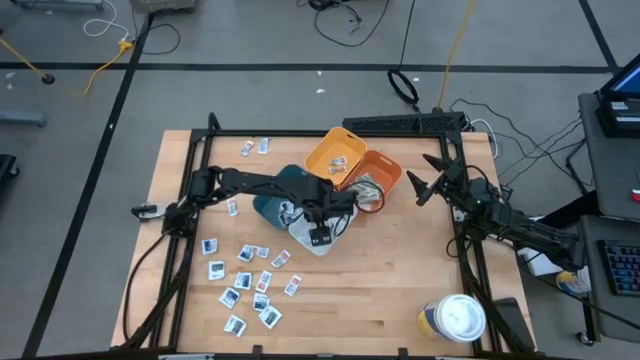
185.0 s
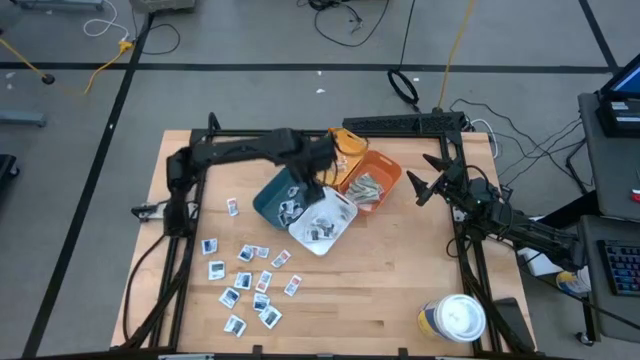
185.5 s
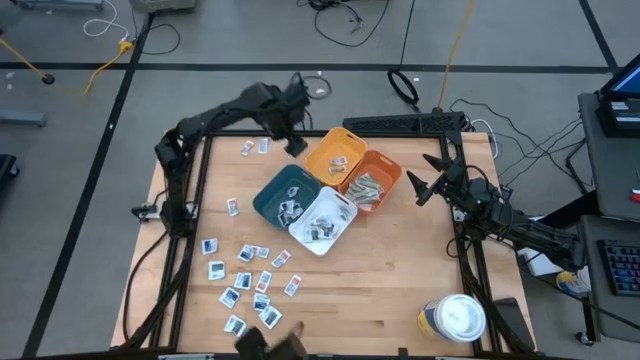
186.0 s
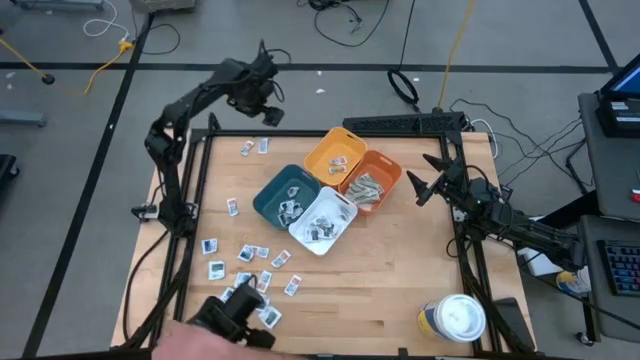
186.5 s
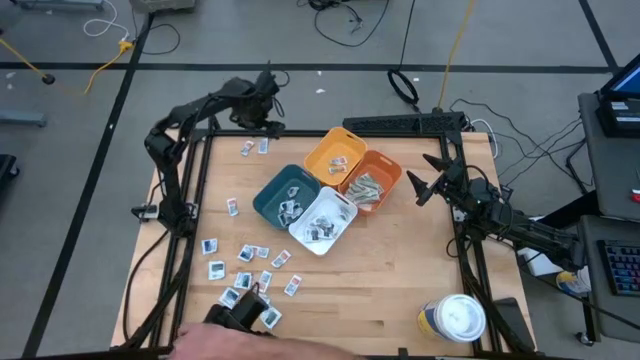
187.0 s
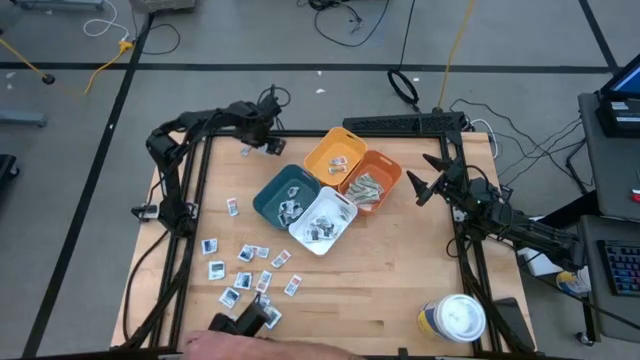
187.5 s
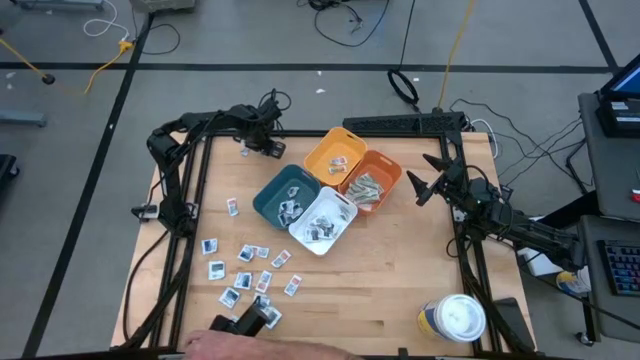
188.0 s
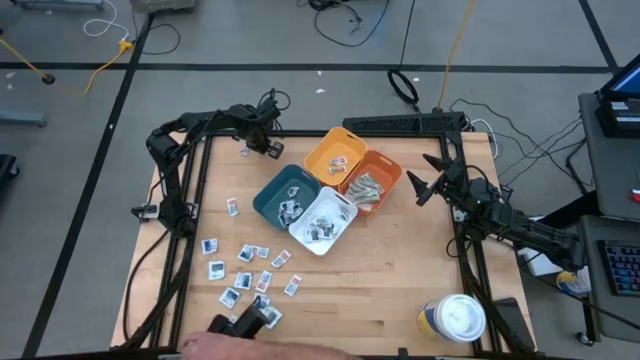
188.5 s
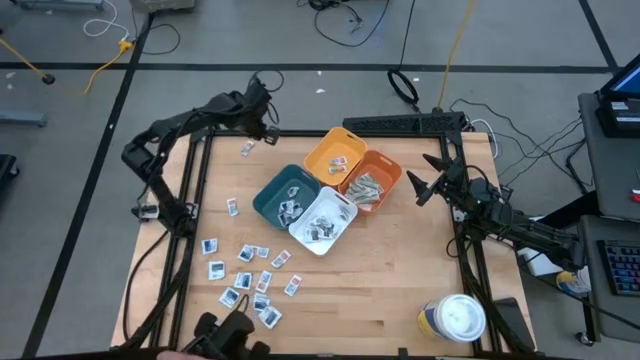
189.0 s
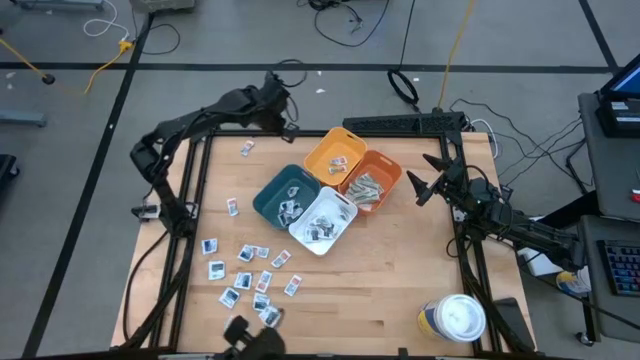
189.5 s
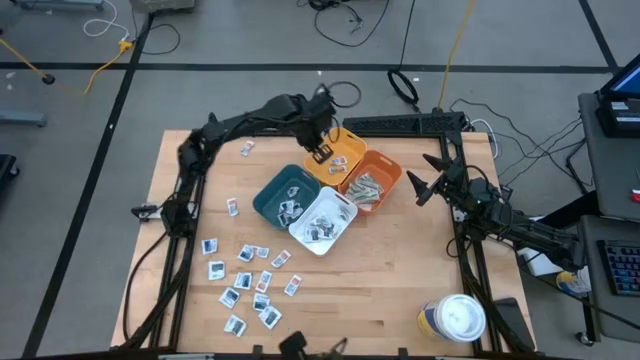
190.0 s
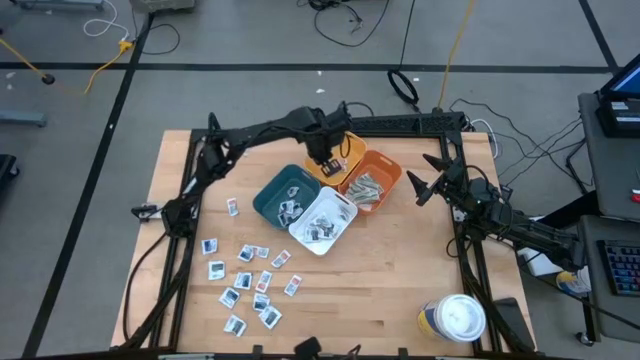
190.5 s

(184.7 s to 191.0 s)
Task: Pick & Place First Aid Supplies
Put the orange ointment pack into the yellow bin

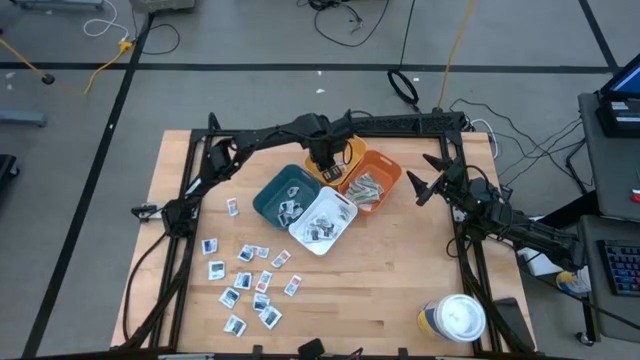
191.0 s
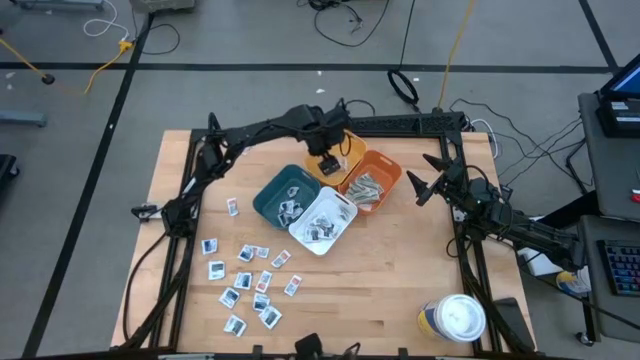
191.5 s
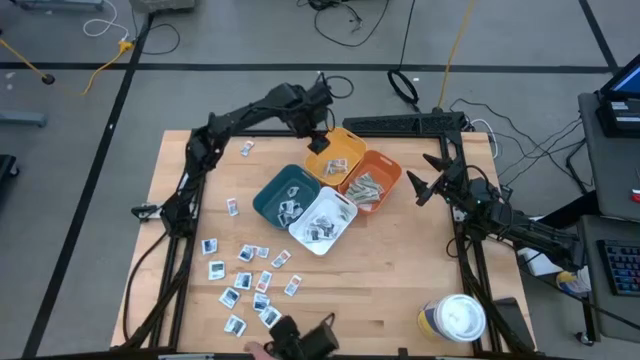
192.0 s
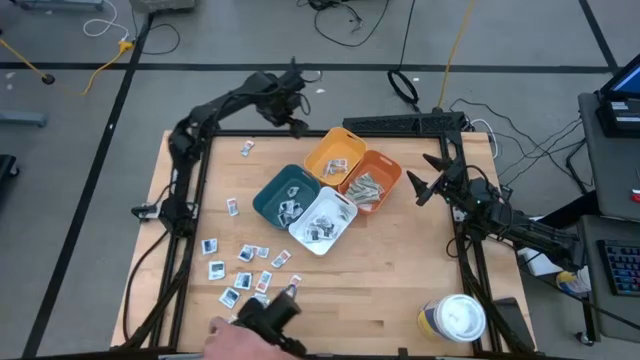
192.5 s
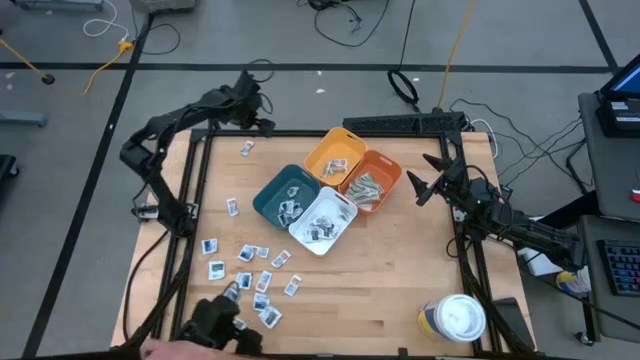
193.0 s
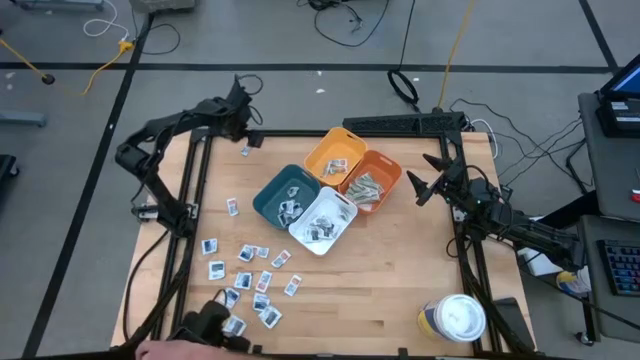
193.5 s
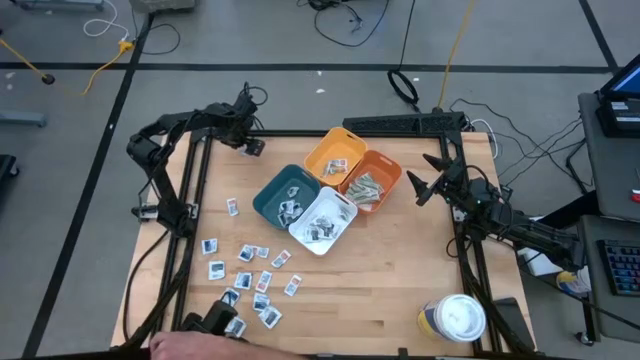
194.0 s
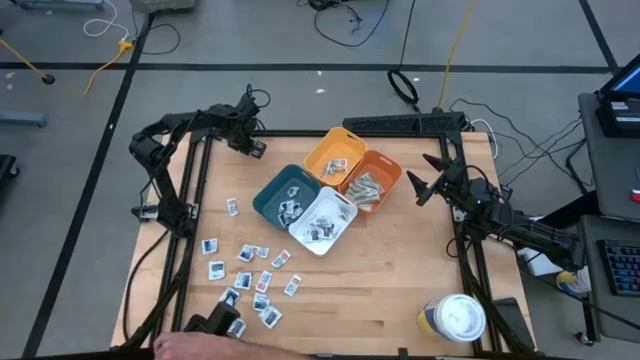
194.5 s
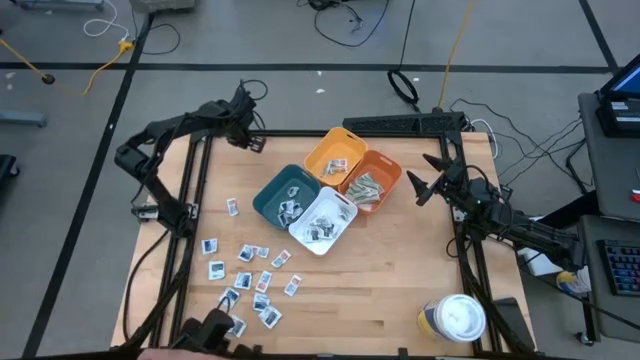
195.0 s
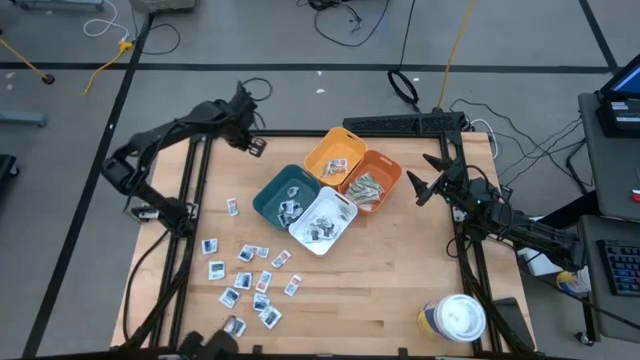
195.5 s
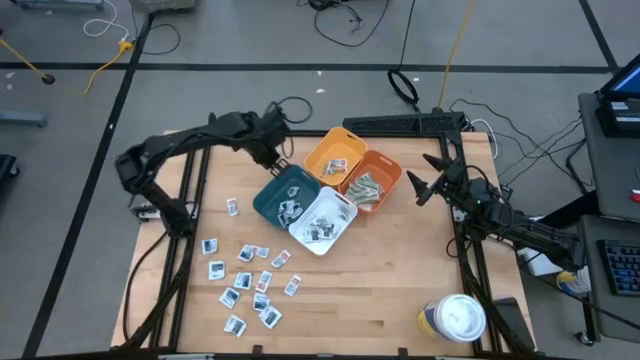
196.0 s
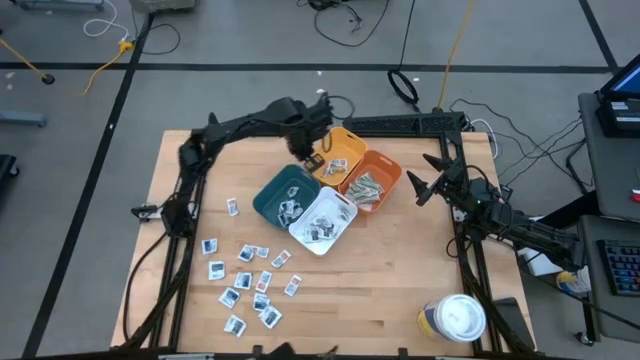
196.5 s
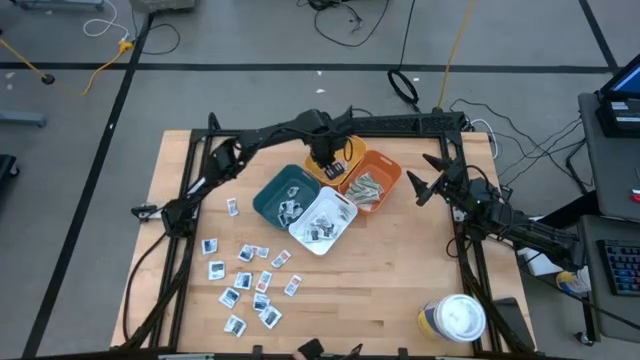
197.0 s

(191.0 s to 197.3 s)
Put the orange ointment pack into the yellow bin

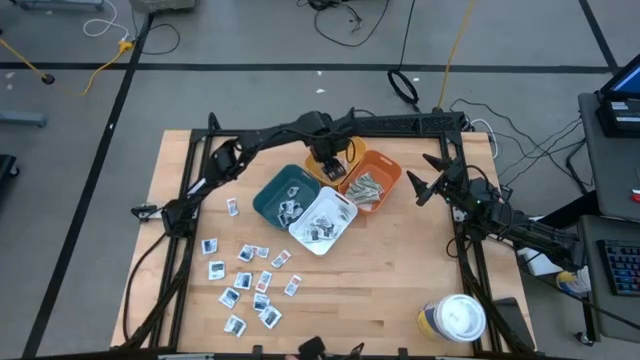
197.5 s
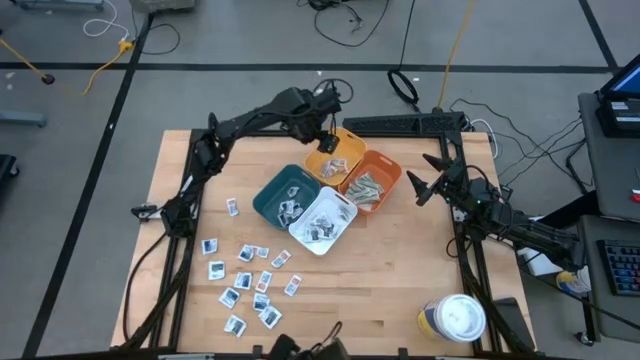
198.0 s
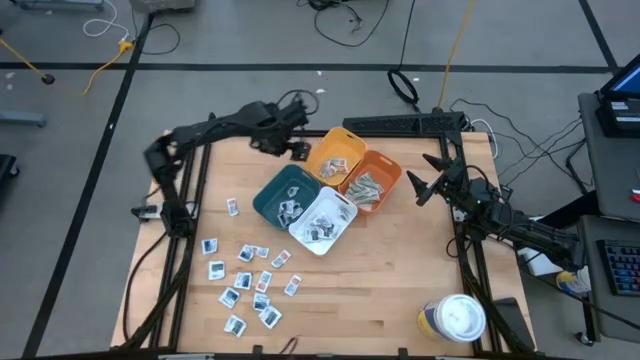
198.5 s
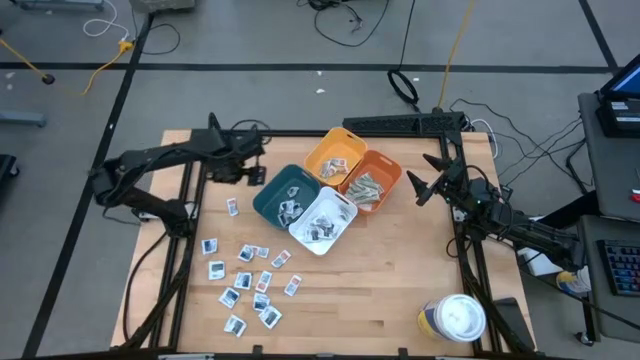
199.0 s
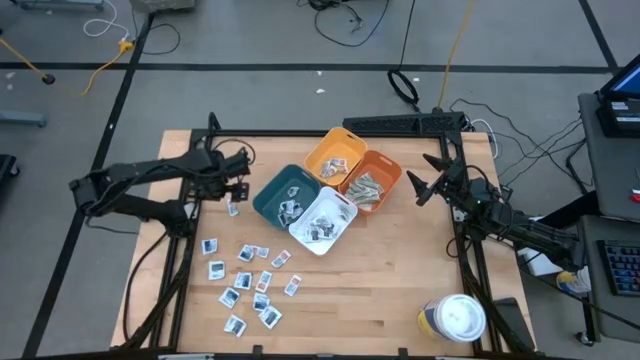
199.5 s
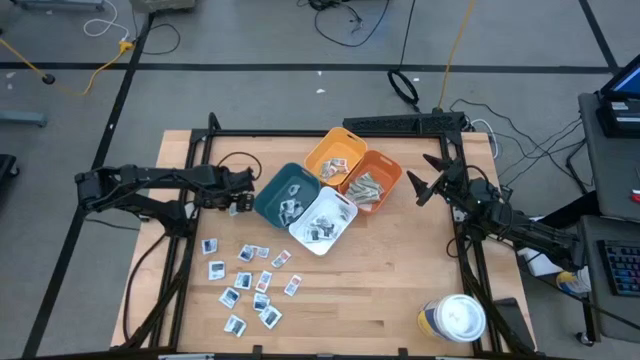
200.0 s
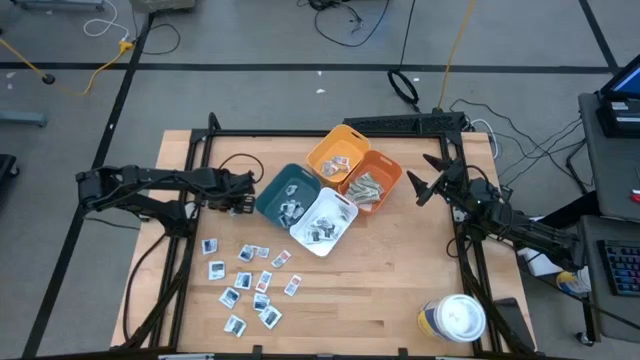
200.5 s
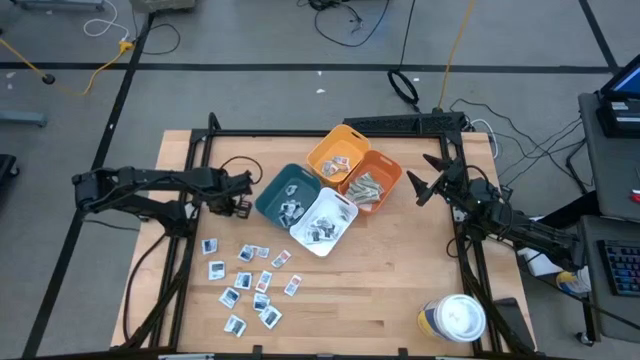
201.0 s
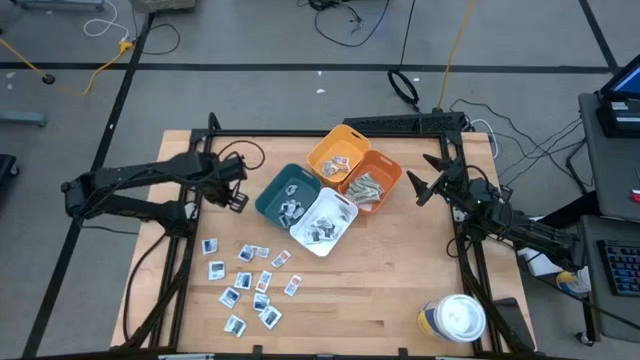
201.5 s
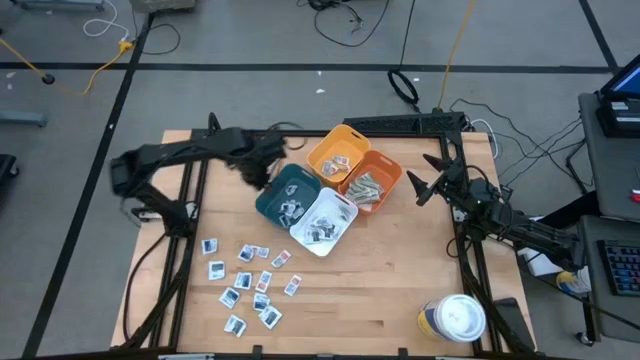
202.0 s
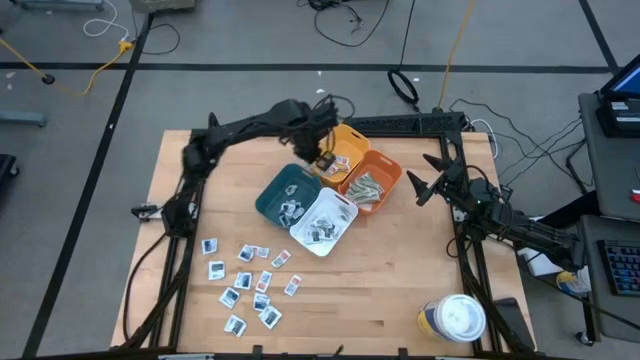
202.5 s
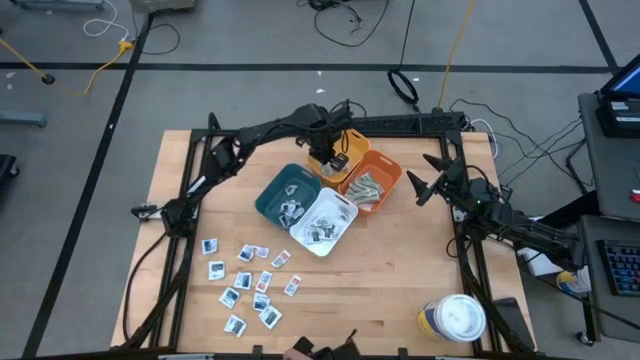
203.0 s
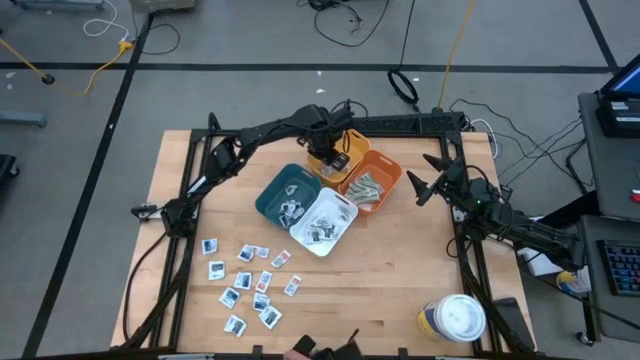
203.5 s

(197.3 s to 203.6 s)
Put the orange ointment pack into the yellow bin

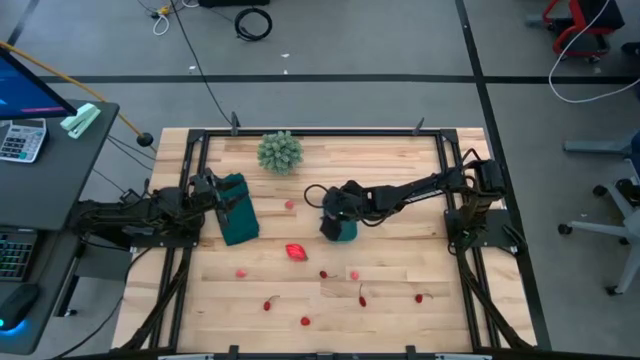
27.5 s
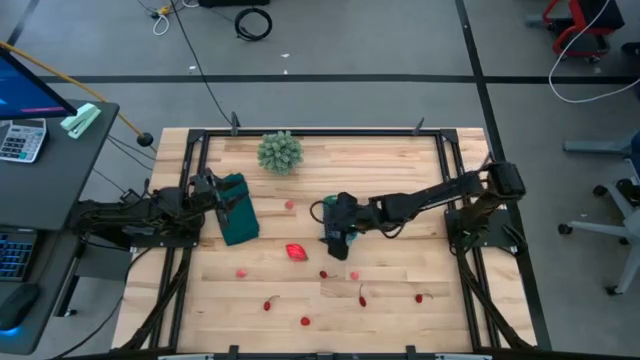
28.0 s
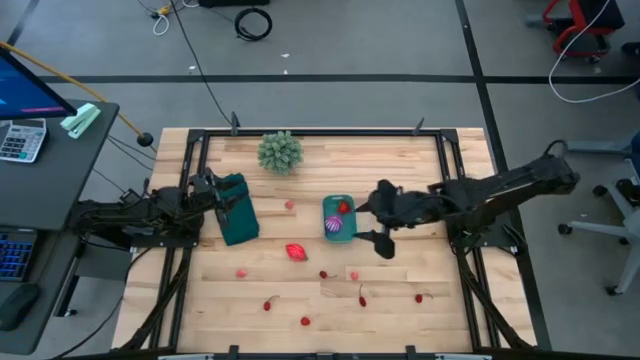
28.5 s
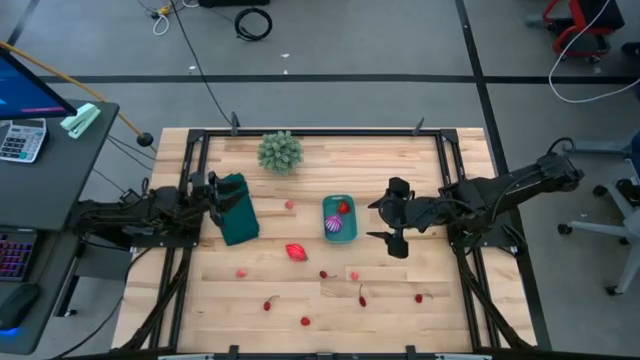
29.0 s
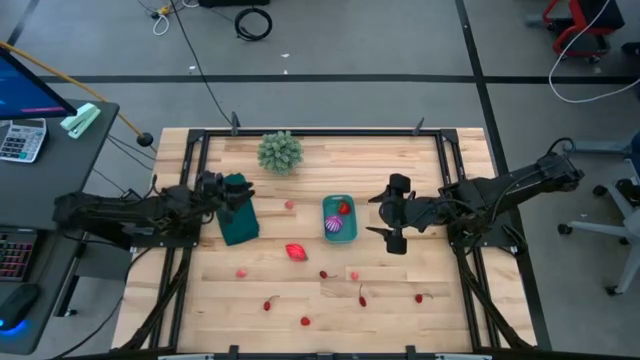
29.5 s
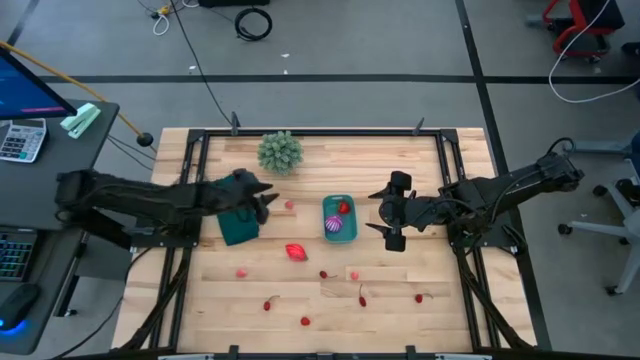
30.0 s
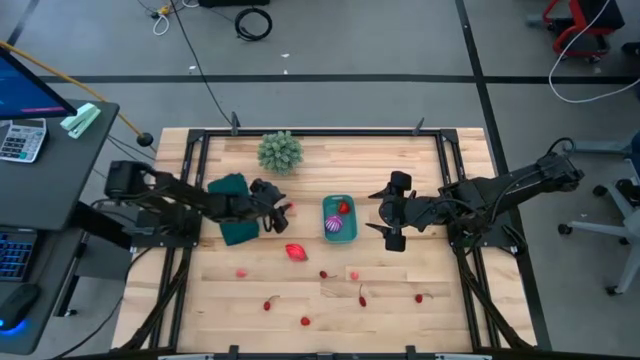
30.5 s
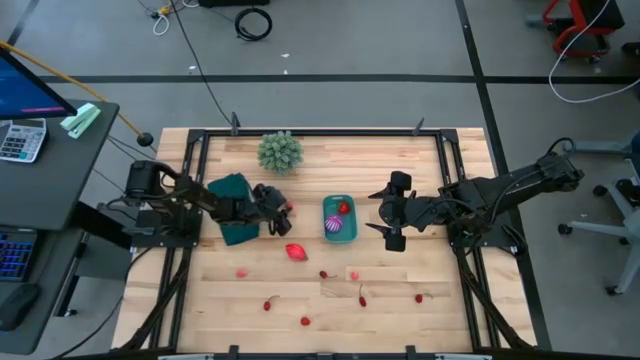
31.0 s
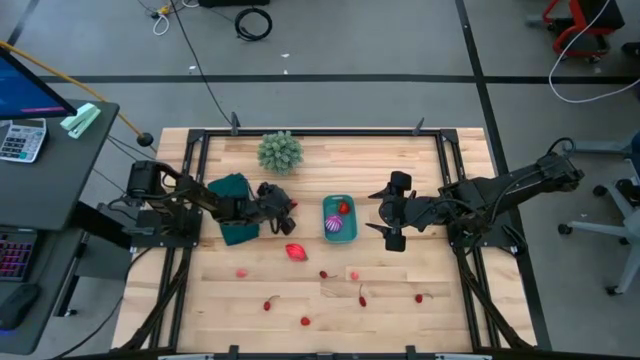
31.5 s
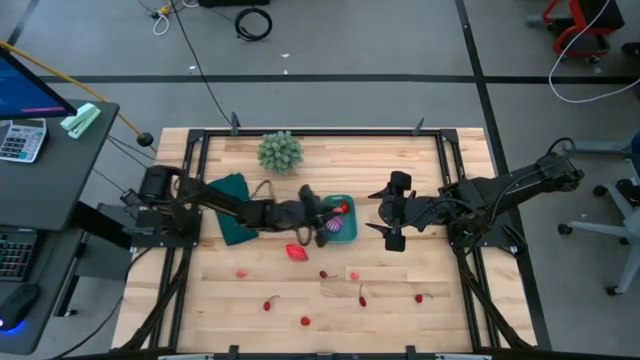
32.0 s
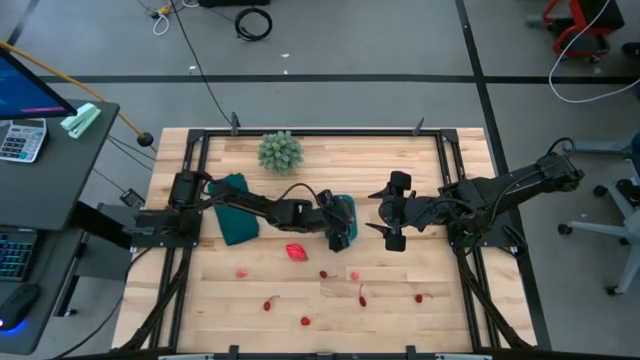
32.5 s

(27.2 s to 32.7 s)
Task: Pick and placing Produce into tupperware
Put the pink peach into the blue bin
